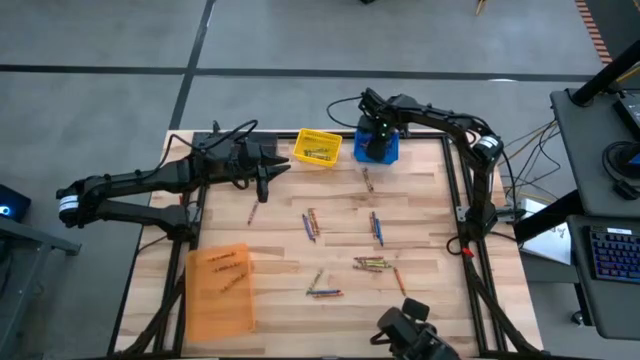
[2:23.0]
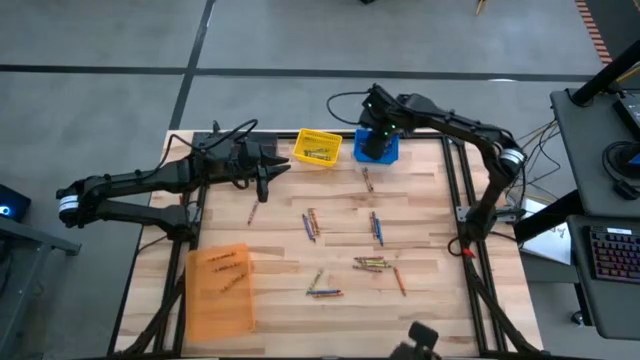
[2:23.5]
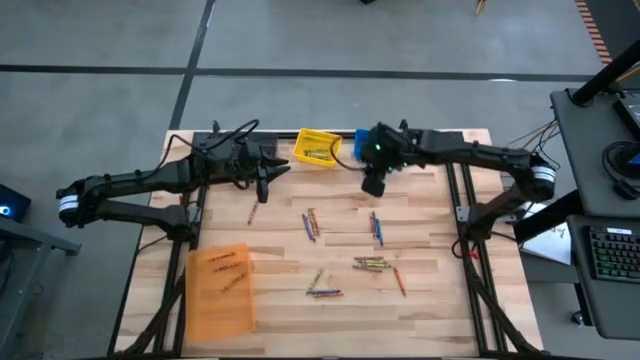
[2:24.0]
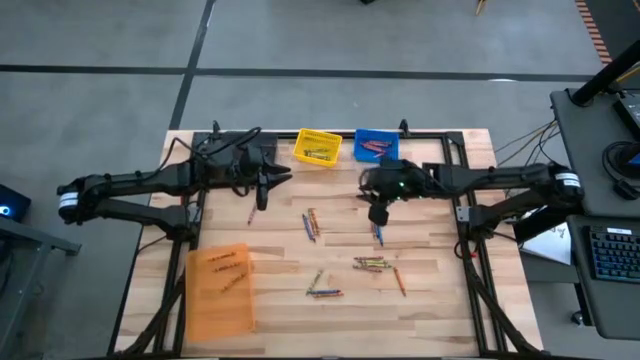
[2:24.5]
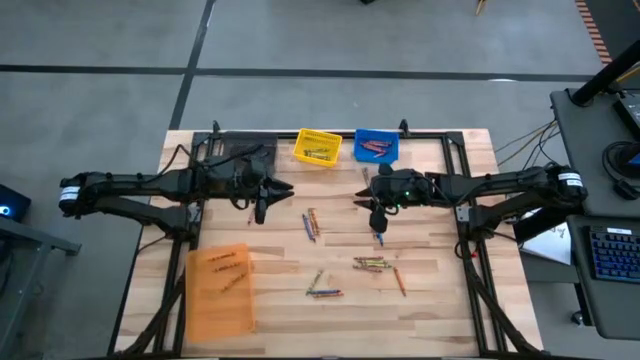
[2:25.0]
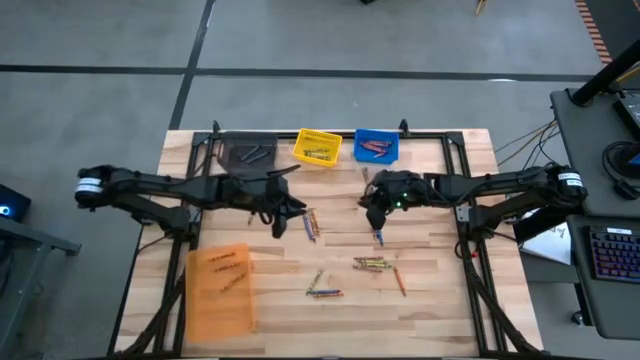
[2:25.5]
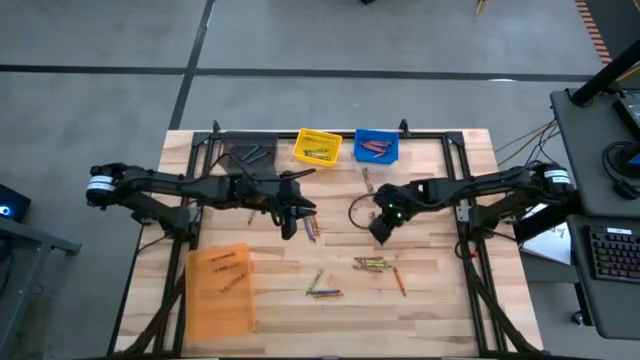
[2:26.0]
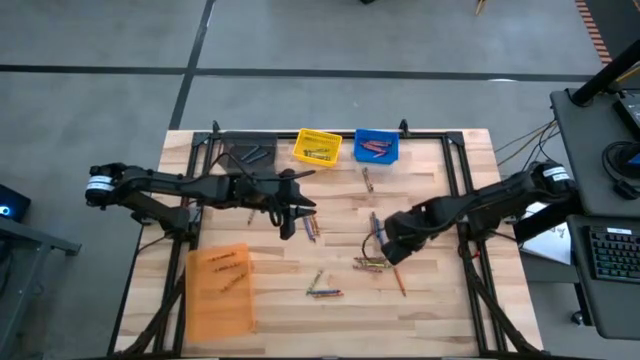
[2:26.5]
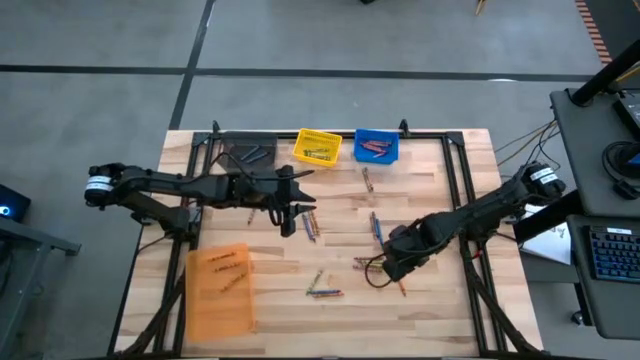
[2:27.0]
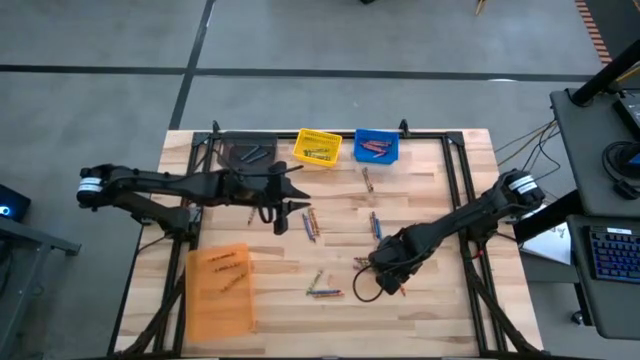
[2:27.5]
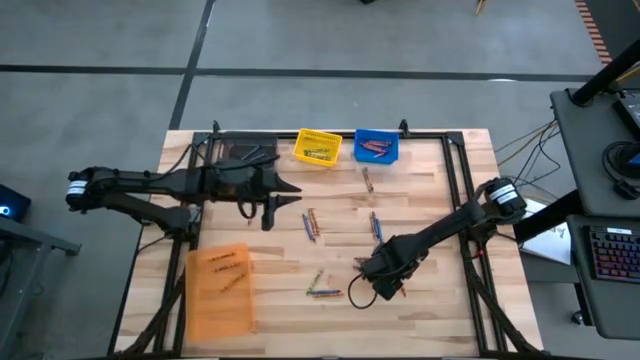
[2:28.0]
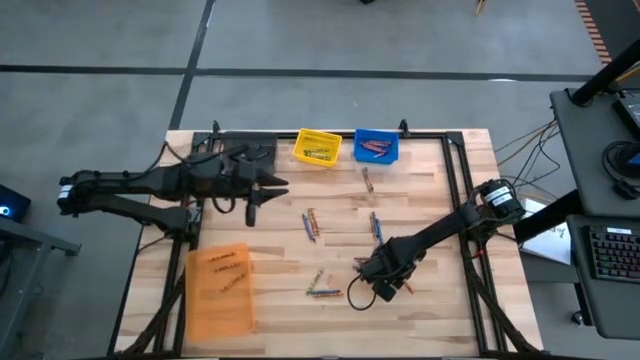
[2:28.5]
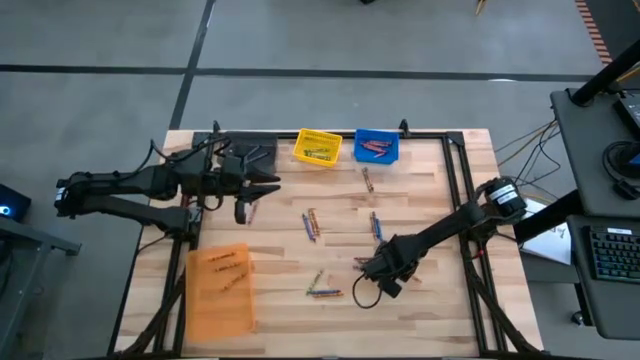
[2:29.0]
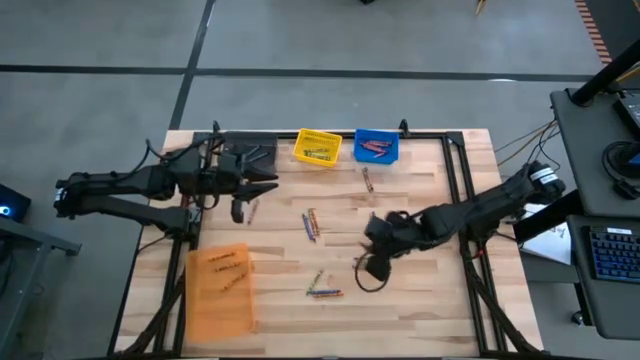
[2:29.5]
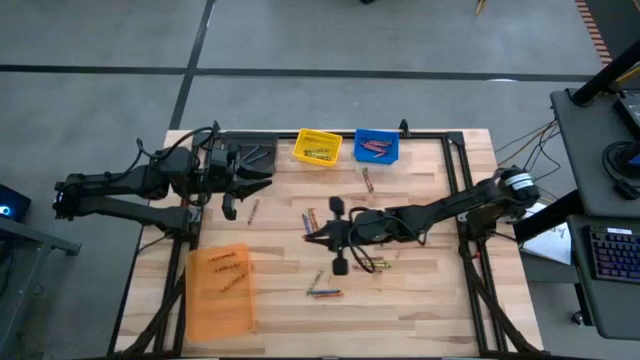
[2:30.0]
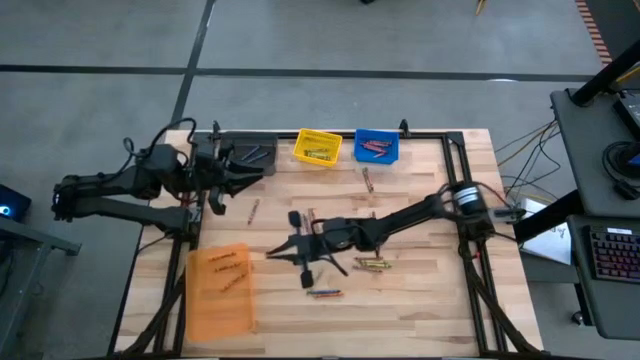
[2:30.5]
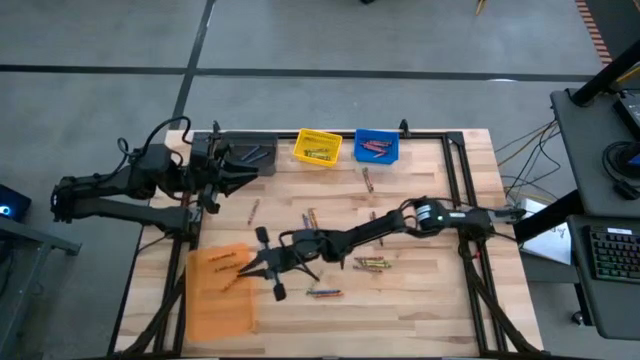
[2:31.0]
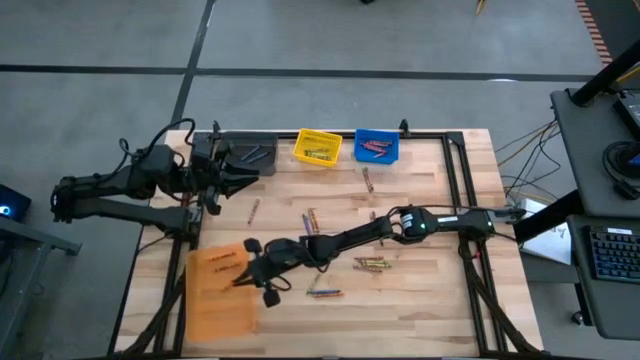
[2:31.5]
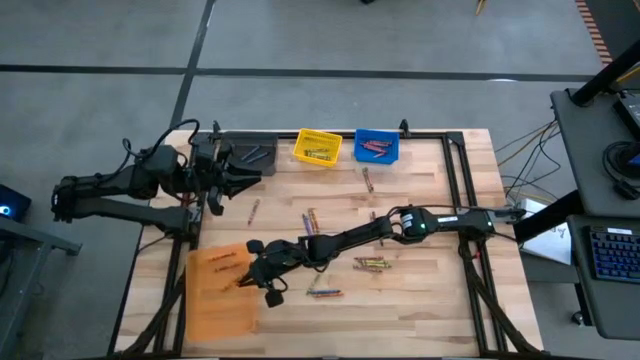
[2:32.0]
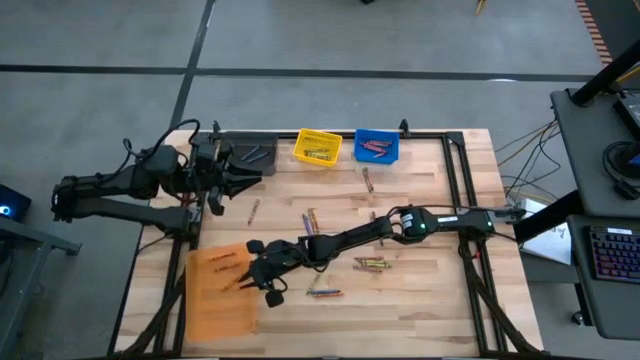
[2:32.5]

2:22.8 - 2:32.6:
Task: Sort crayons
Put the orange crayon into the orange bin

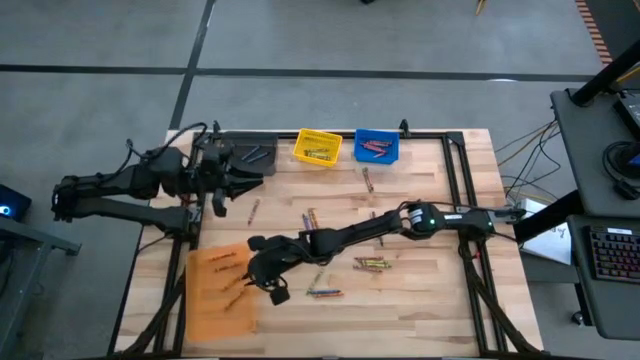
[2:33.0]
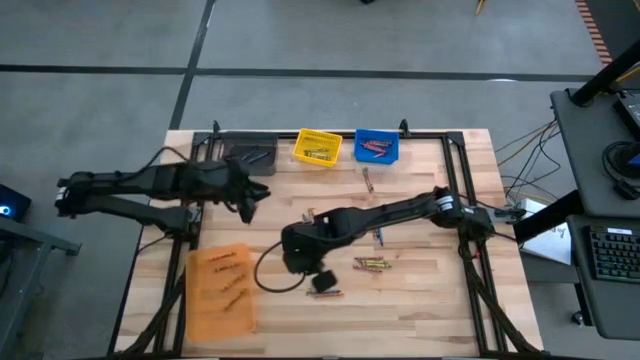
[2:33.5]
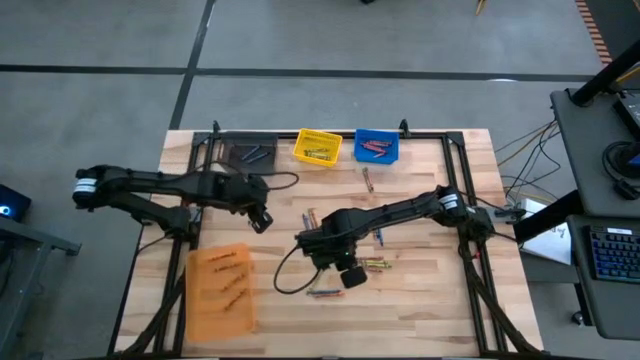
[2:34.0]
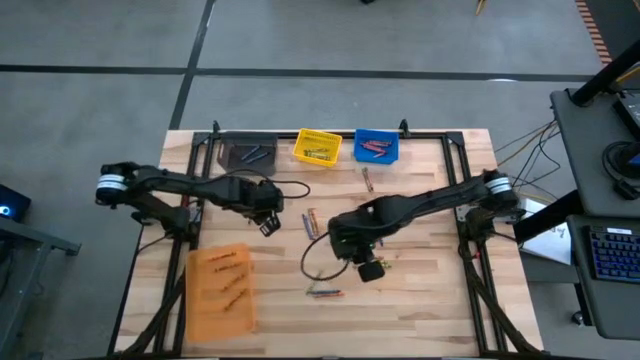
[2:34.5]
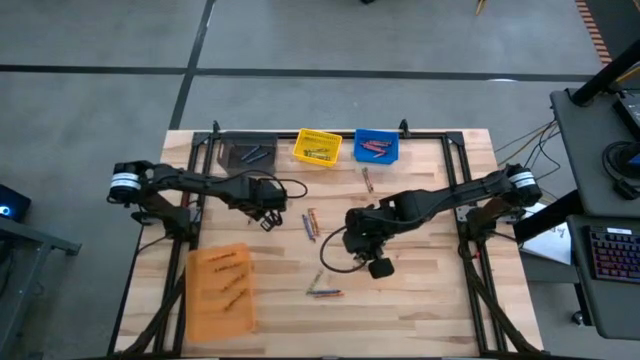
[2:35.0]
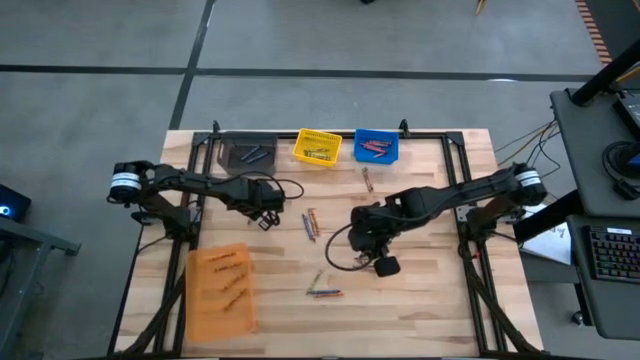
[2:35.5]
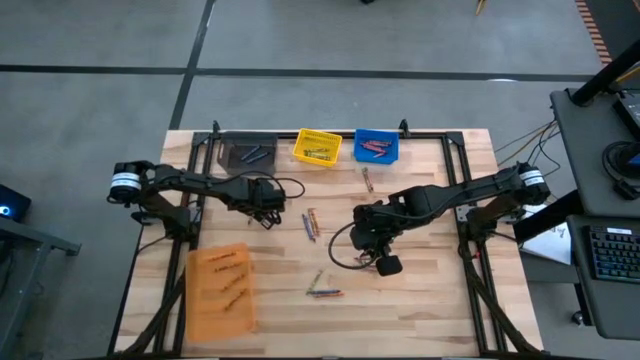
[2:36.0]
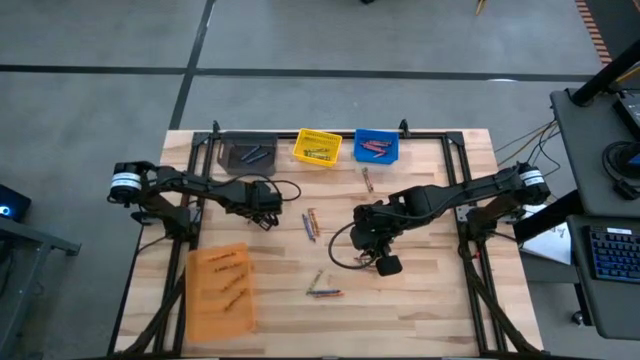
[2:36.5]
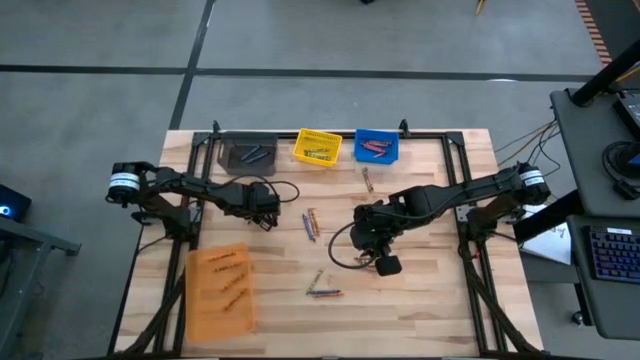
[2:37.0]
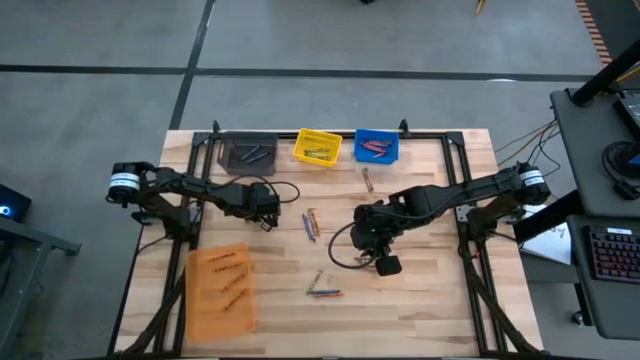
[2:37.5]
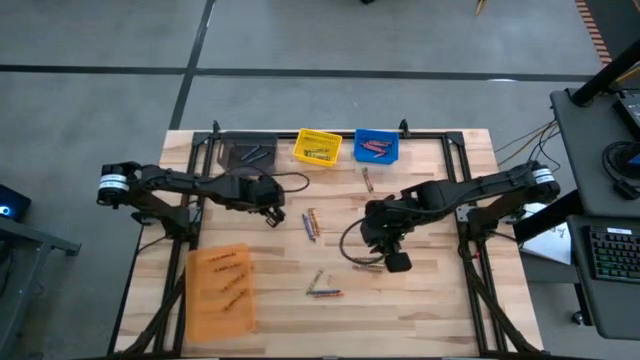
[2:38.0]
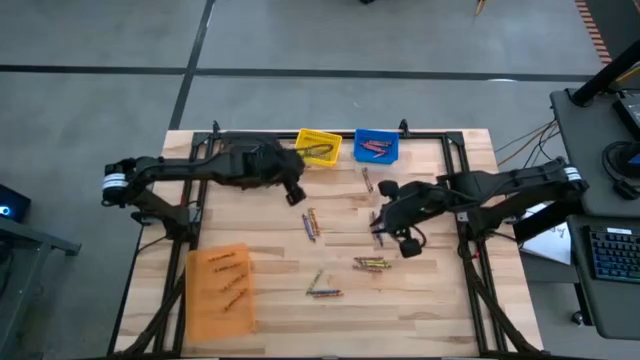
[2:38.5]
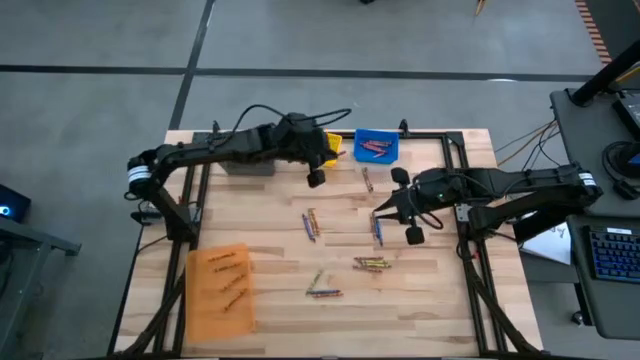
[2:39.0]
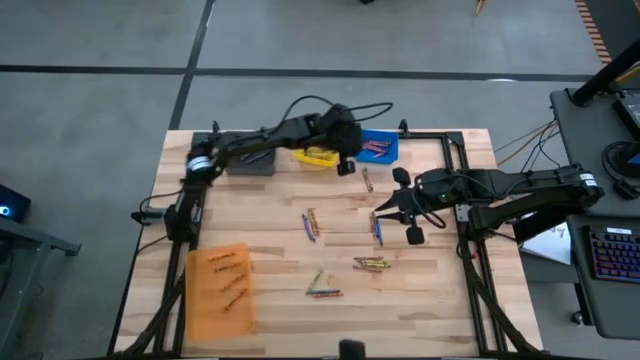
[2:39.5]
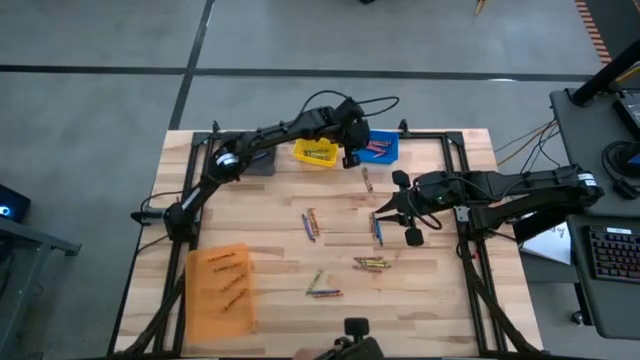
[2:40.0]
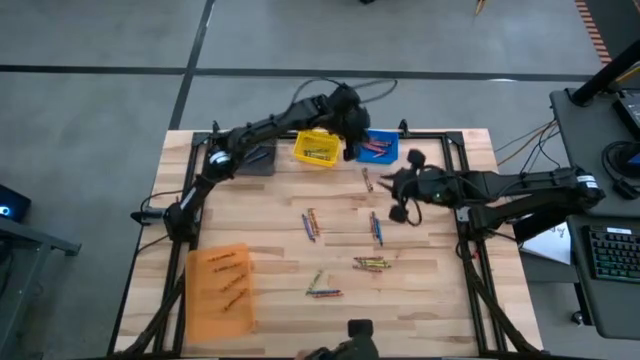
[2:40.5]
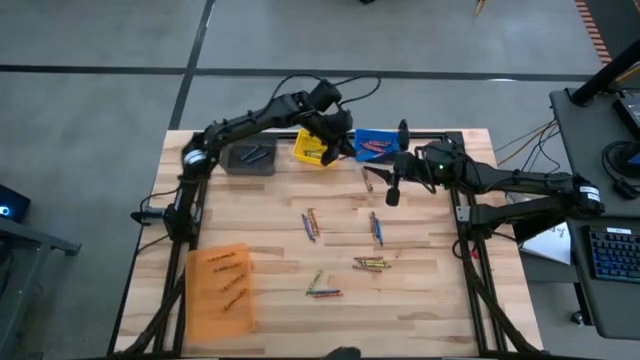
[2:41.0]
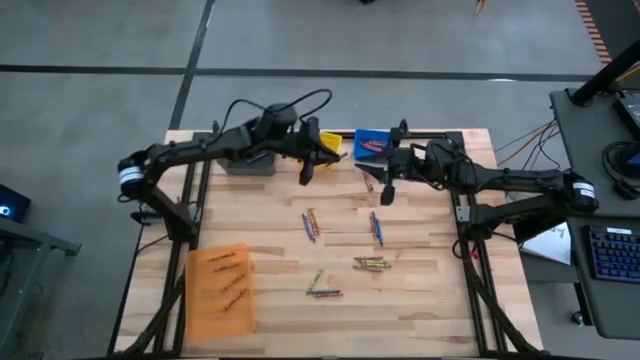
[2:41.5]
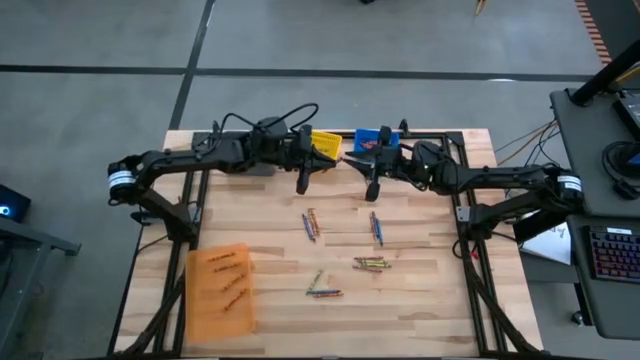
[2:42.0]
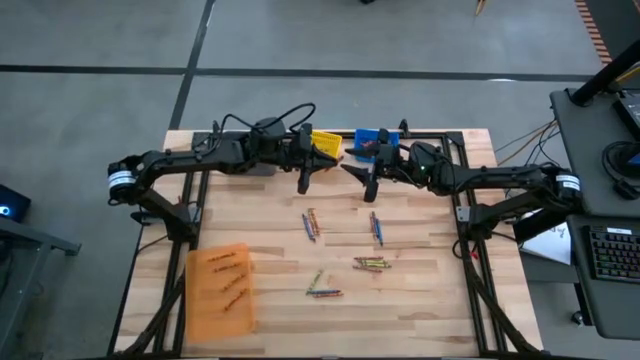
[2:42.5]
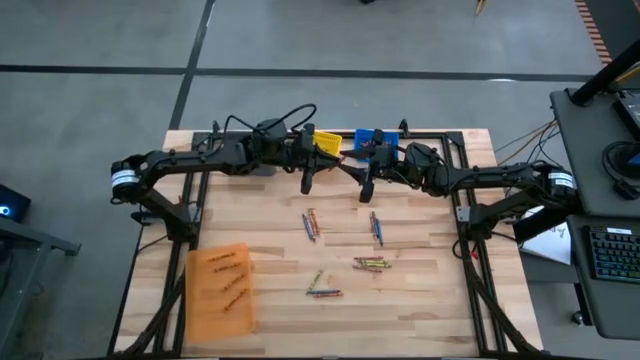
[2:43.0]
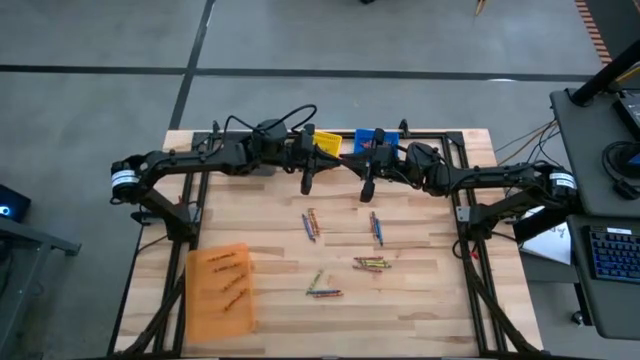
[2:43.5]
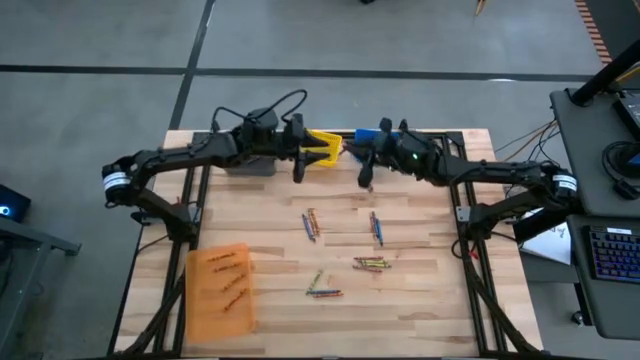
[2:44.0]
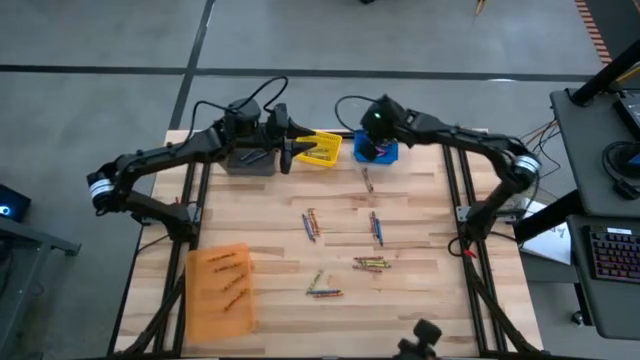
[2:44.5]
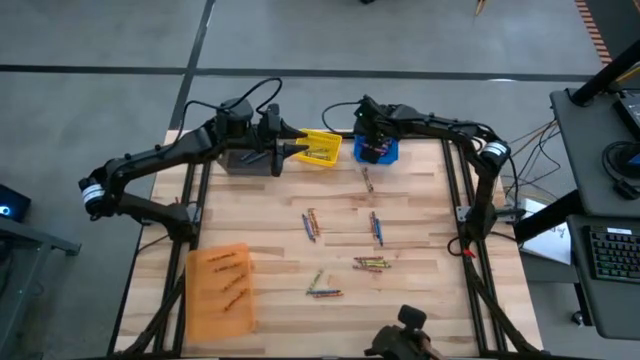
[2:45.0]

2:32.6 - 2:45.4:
Put the red crayon into the blue bin
